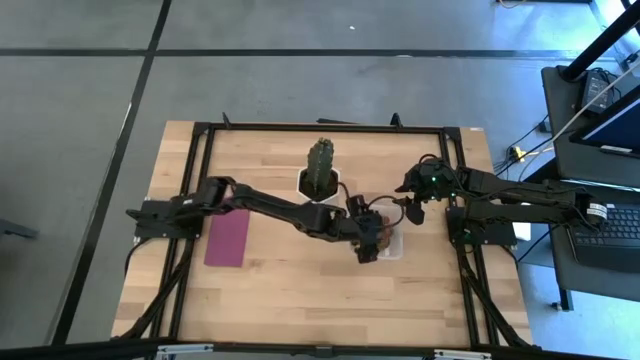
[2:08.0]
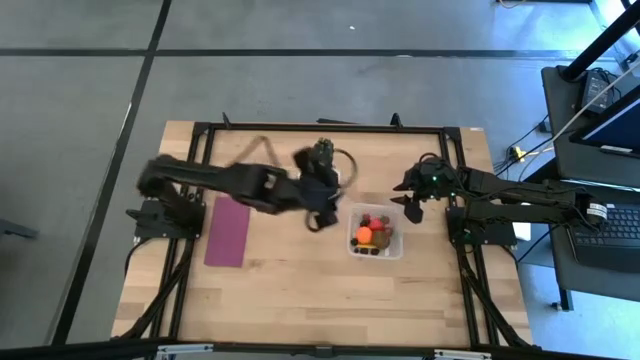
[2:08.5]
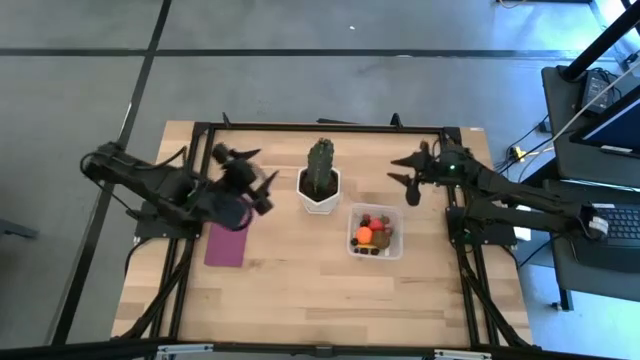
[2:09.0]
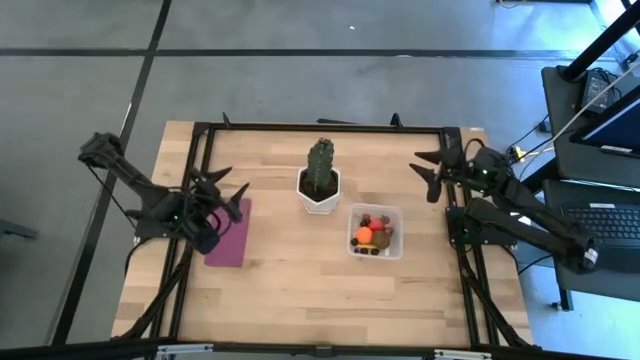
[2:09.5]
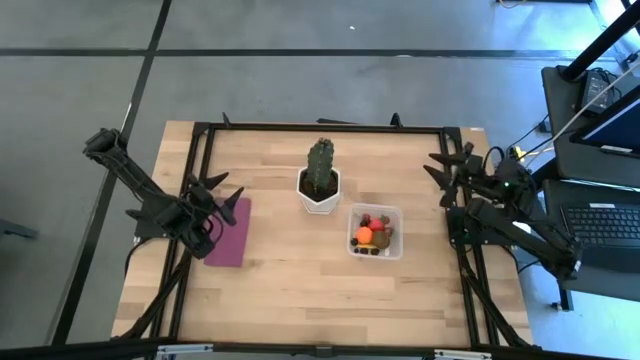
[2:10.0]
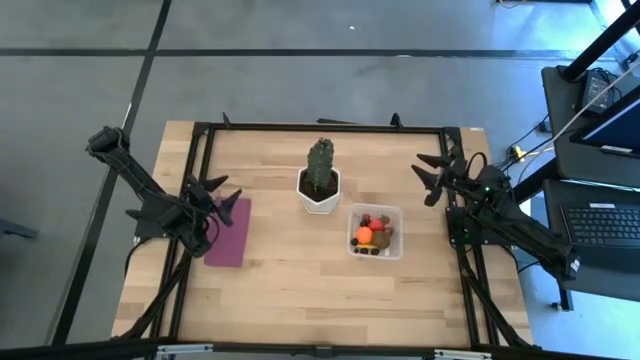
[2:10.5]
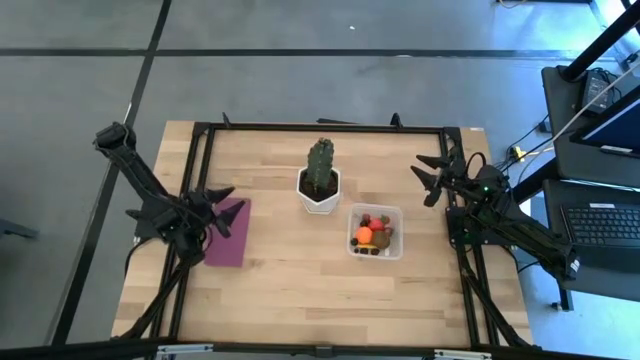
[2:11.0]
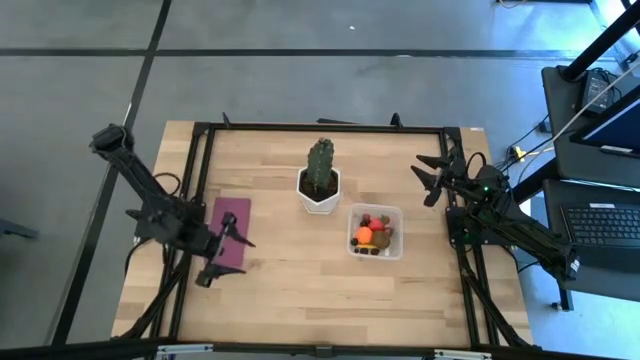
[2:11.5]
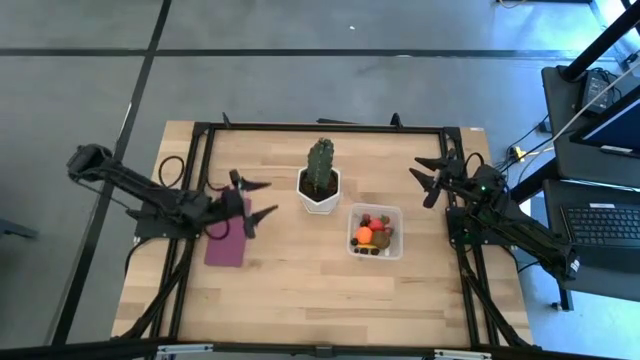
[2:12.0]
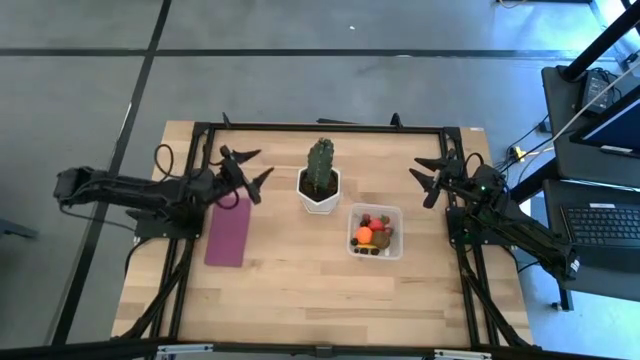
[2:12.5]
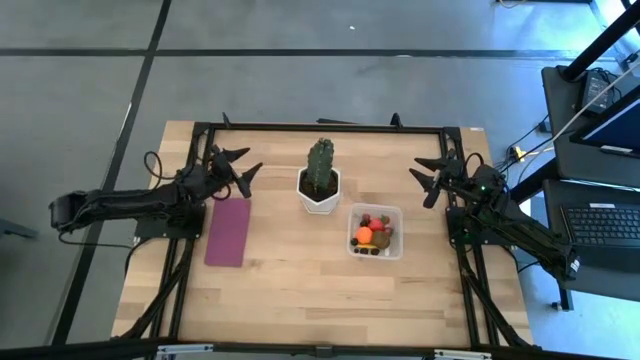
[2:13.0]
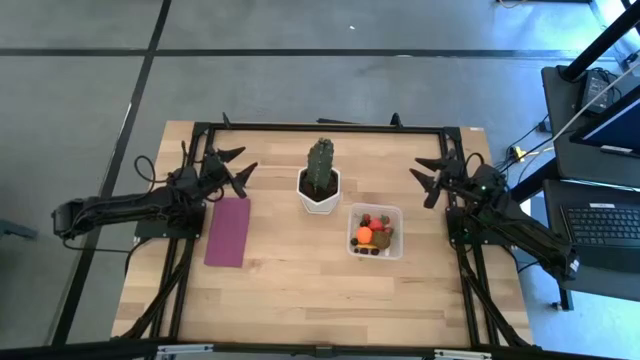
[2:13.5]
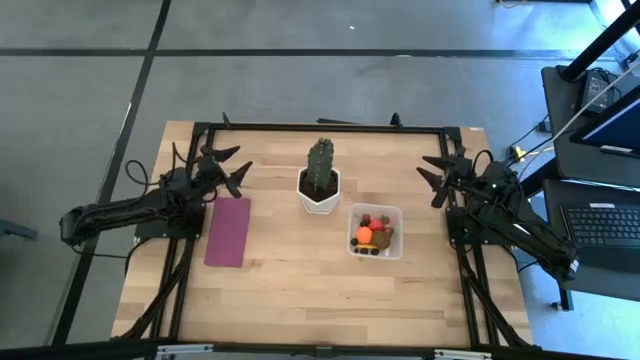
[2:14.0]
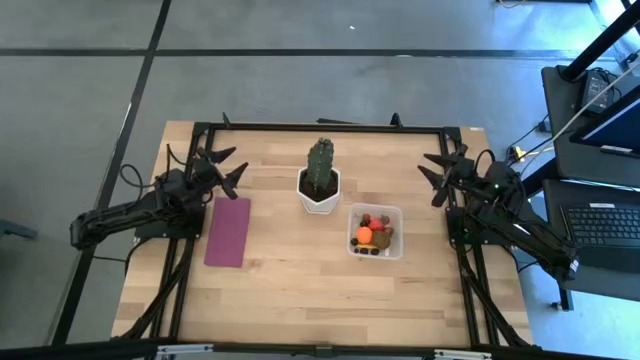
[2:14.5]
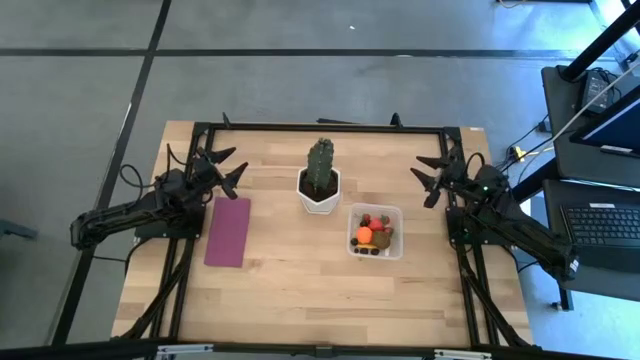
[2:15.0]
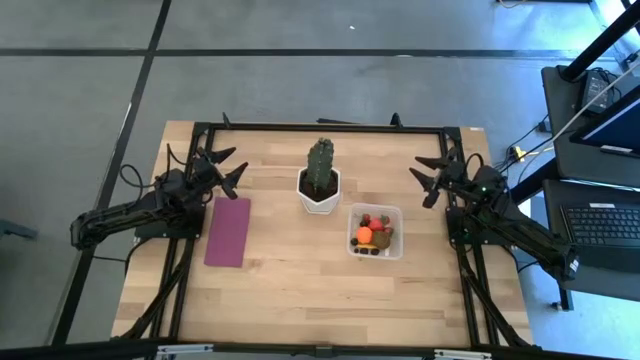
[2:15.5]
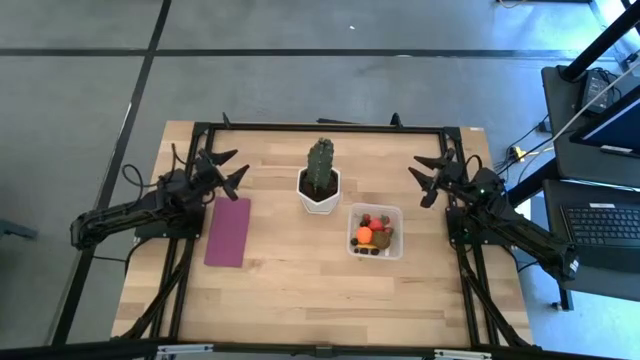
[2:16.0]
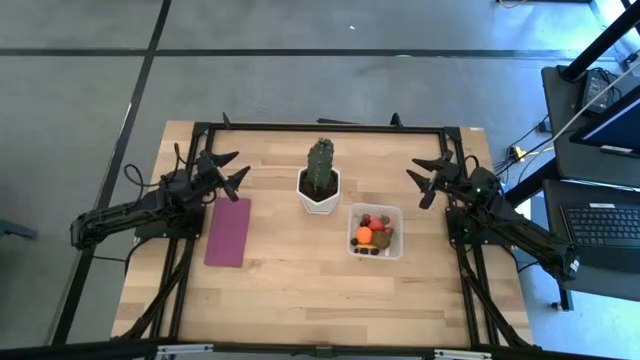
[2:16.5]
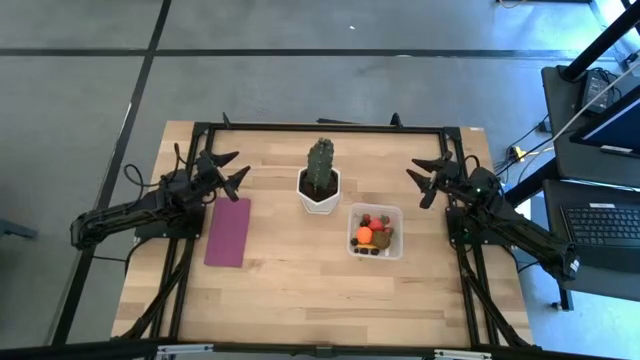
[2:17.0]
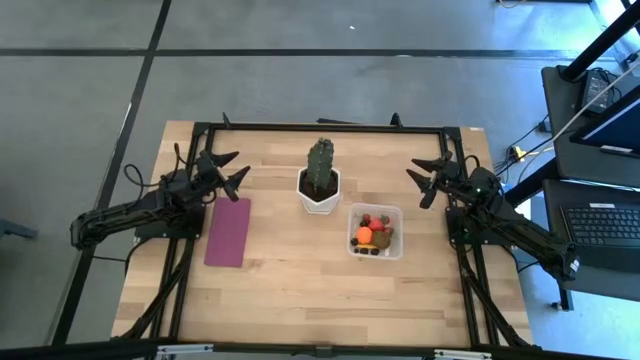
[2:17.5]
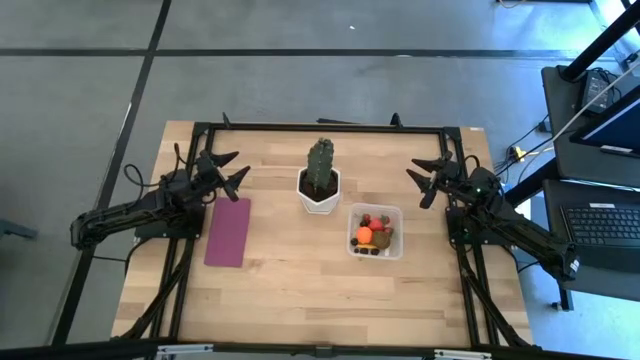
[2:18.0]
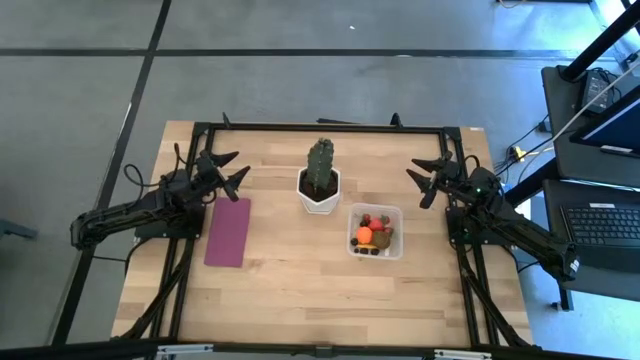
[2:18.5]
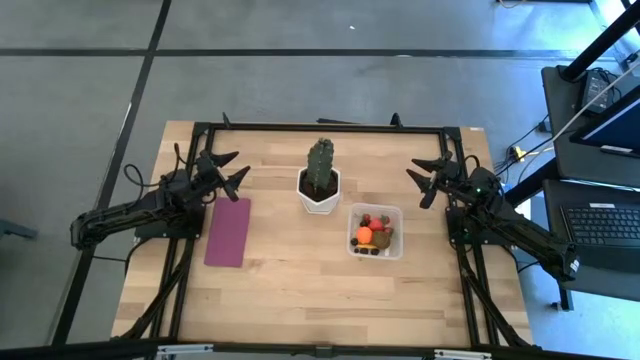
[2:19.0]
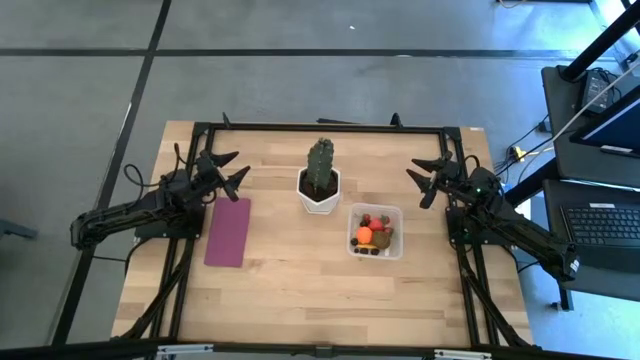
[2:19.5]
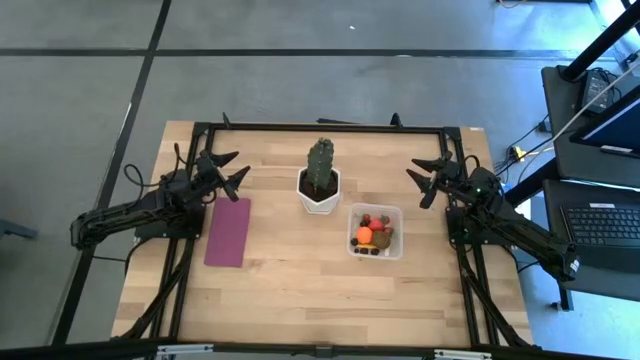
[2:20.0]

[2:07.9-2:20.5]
Task: Pick and placing Produce into tupperware
Return to Home Position

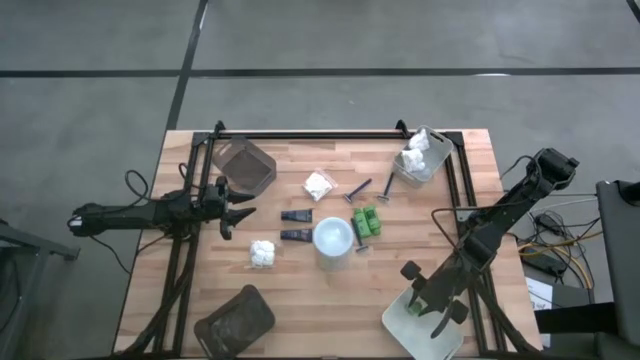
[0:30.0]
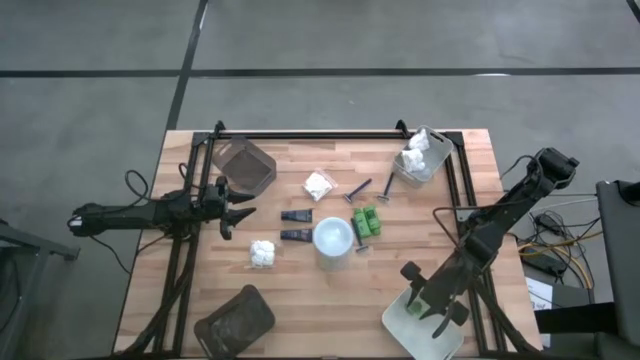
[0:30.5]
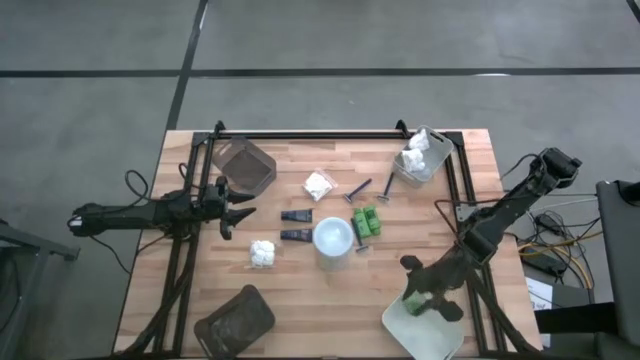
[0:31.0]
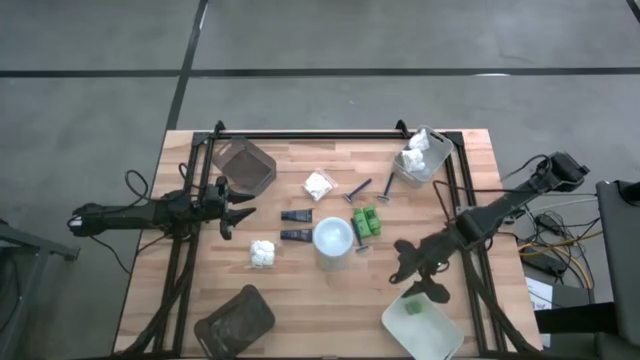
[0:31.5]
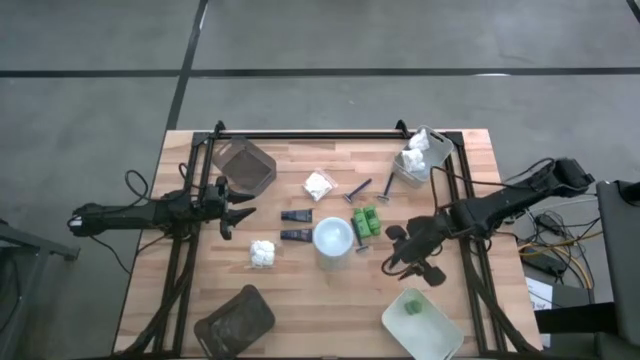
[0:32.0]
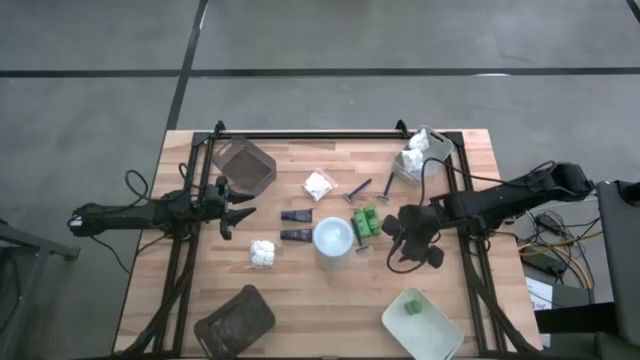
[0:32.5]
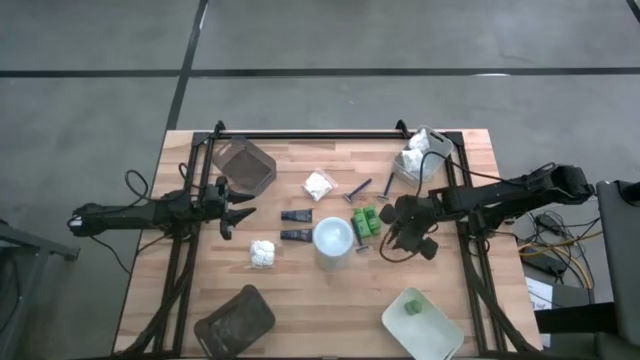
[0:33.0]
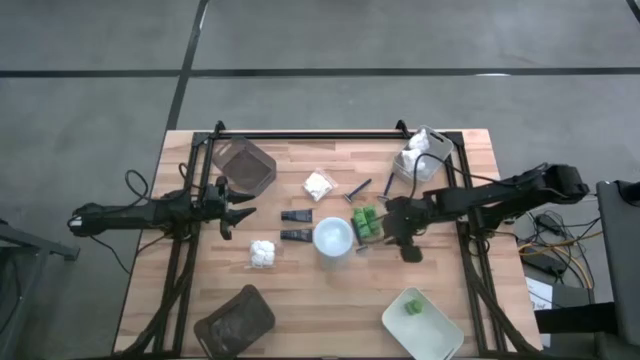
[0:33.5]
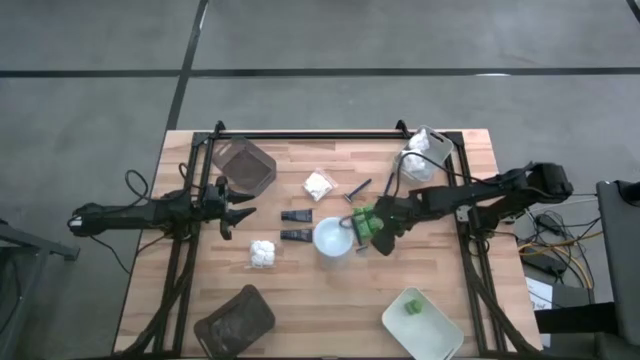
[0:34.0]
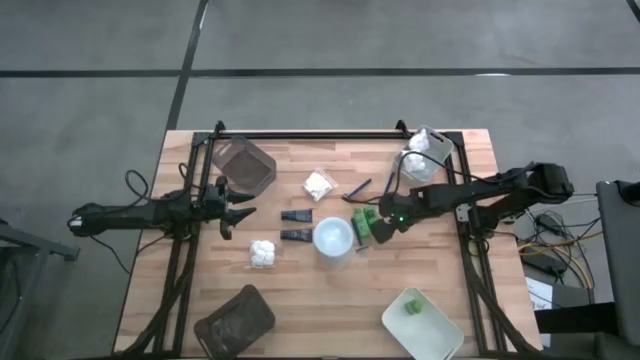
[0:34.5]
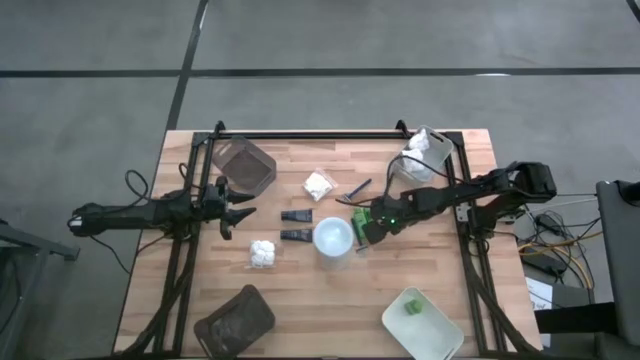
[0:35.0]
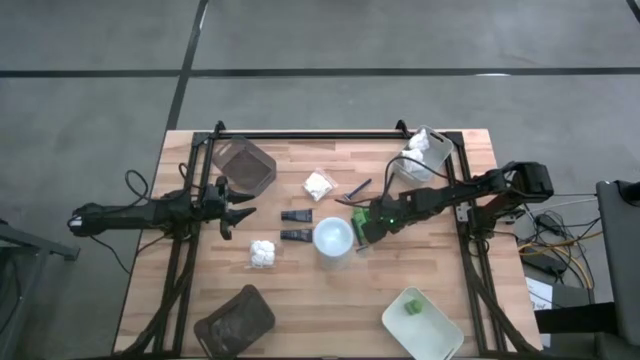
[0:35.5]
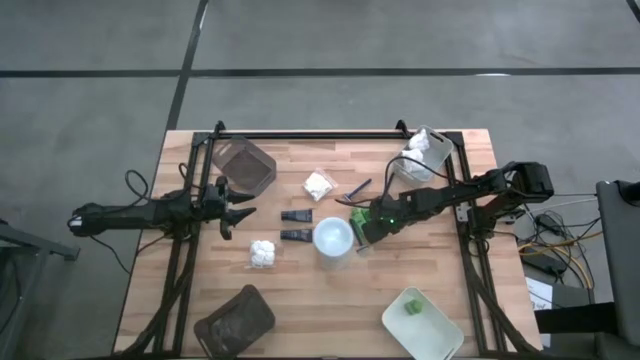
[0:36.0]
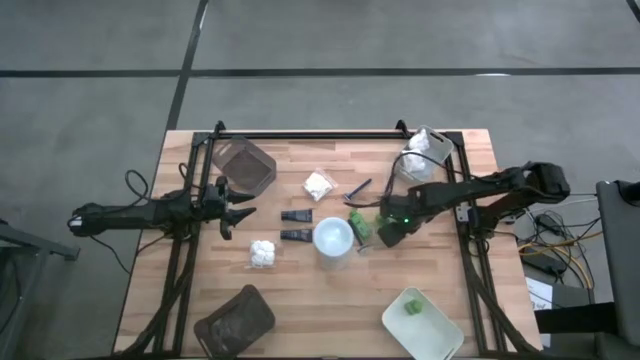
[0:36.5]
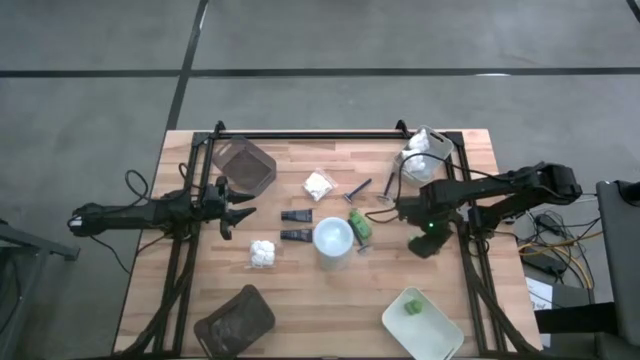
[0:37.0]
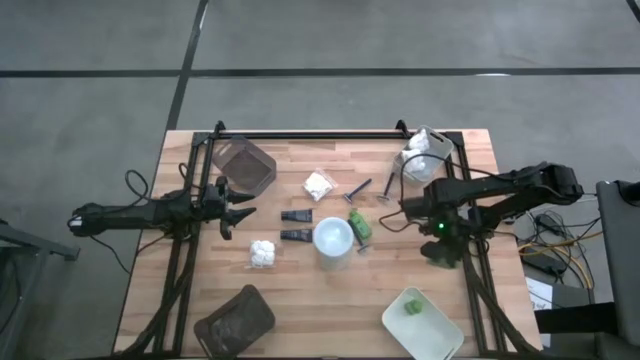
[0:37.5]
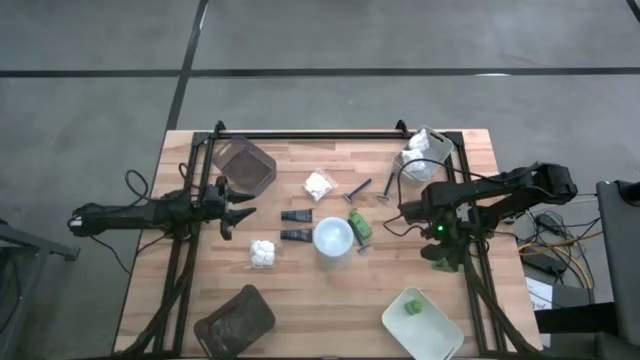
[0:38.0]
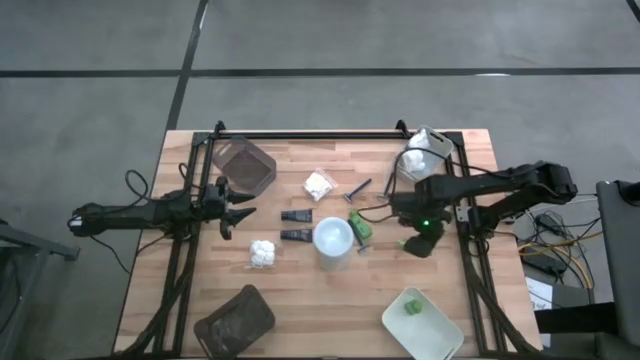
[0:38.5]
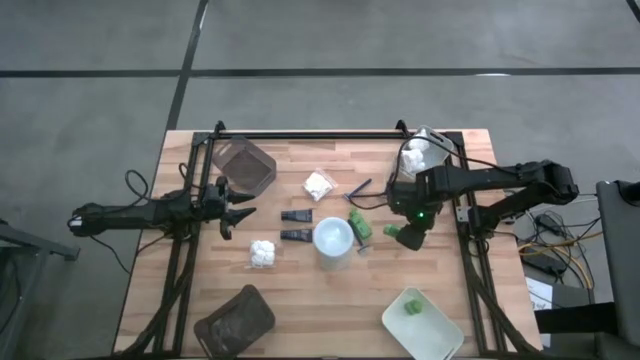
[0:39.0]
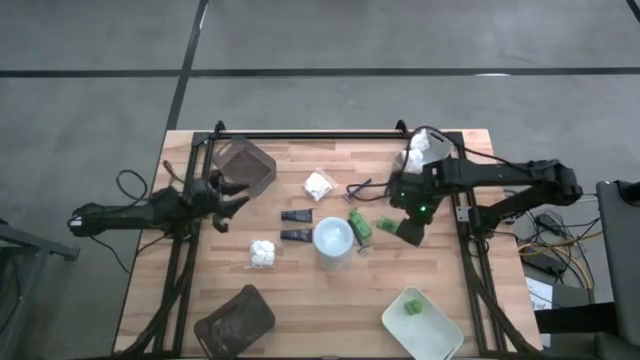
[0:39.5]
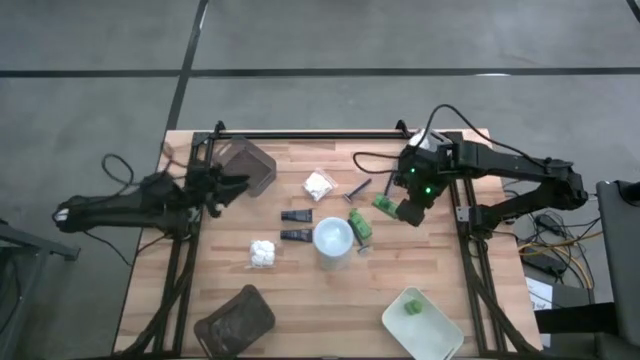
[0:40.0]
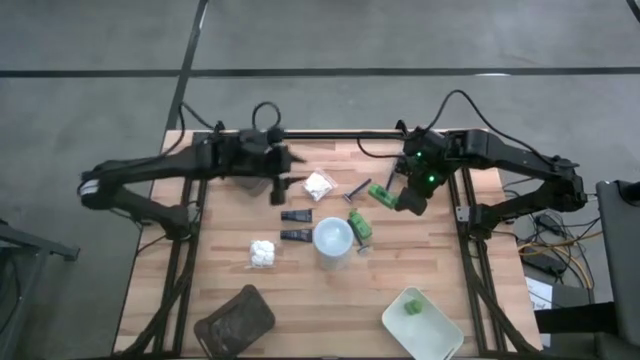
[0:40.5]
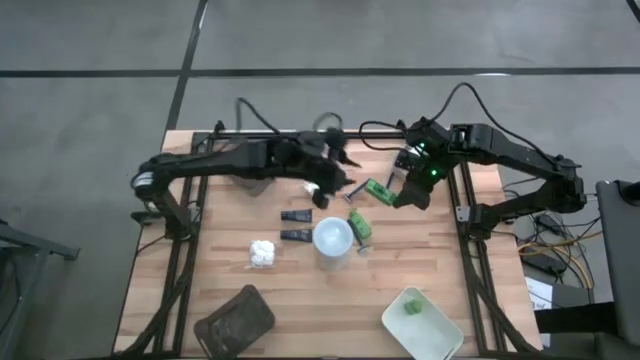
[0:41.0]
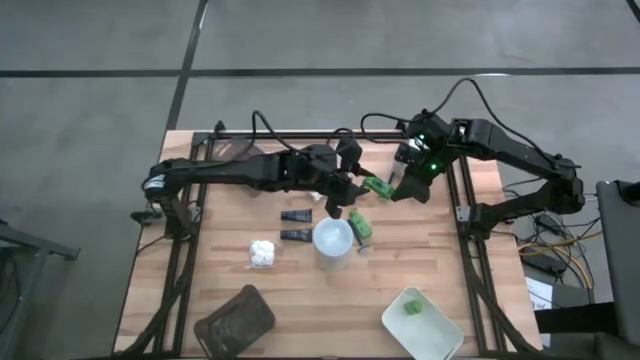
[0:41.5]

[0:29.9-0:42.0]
Task: Pick & Place Travel size toiletries
Put the green shampoo into the white bin
